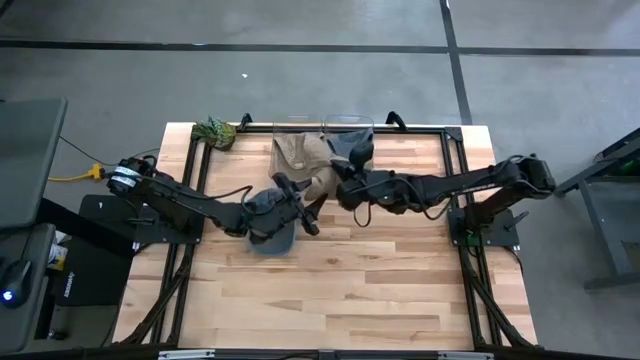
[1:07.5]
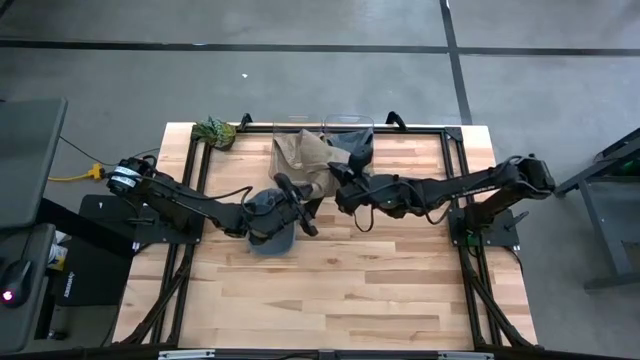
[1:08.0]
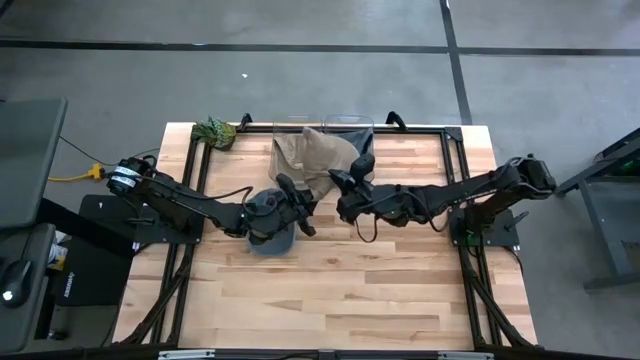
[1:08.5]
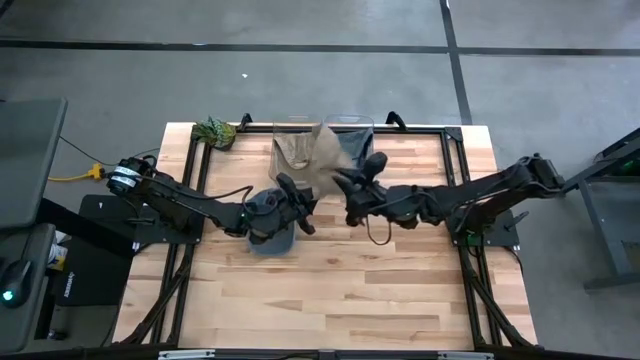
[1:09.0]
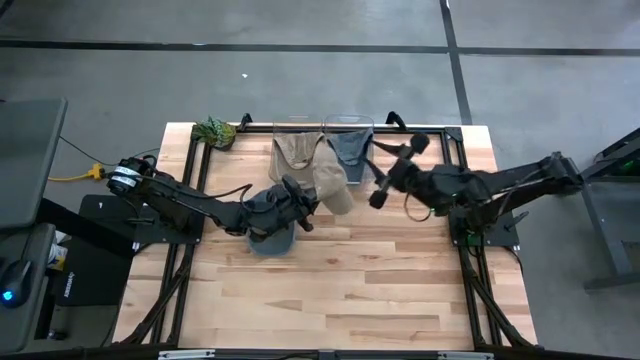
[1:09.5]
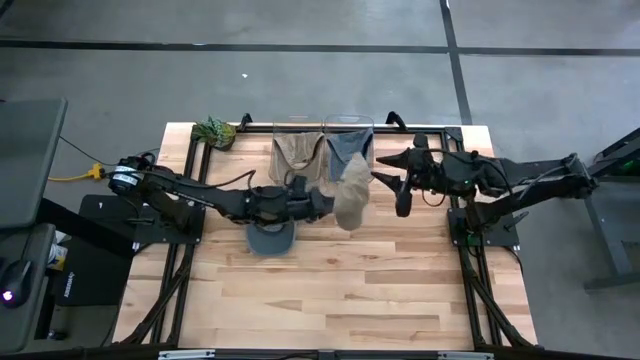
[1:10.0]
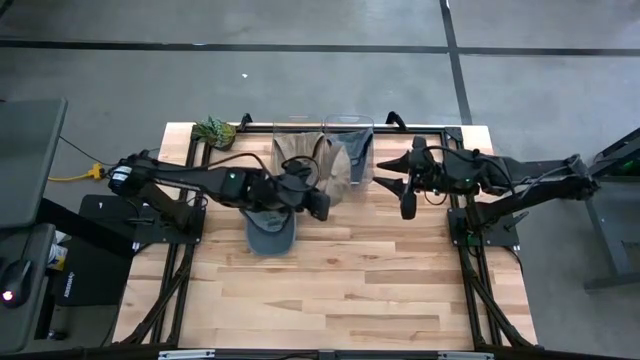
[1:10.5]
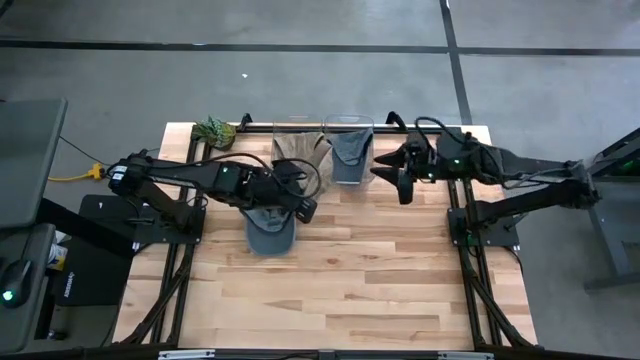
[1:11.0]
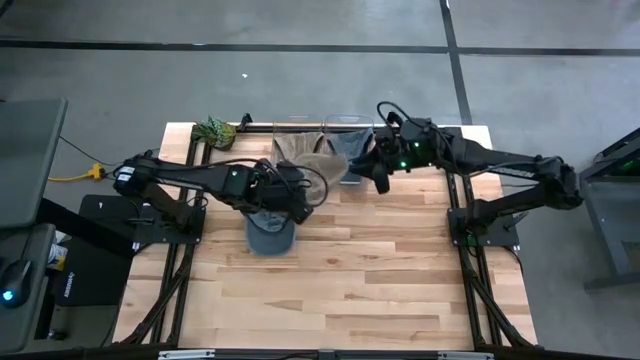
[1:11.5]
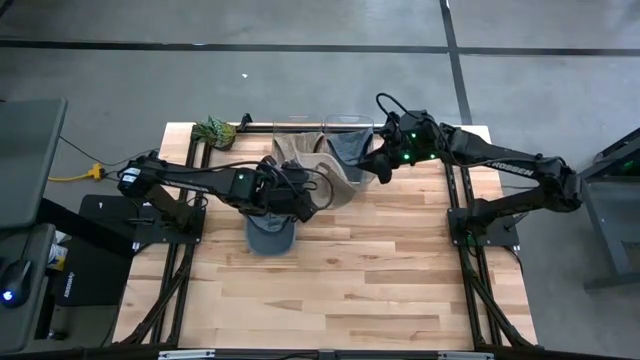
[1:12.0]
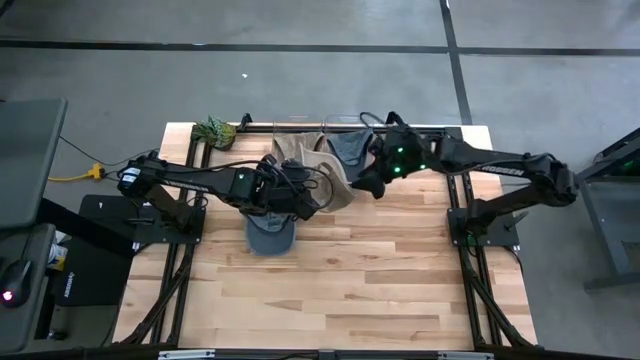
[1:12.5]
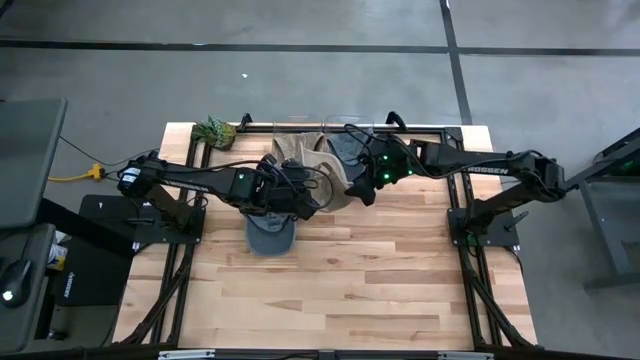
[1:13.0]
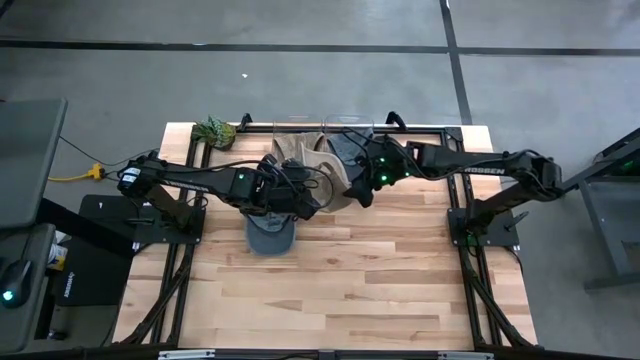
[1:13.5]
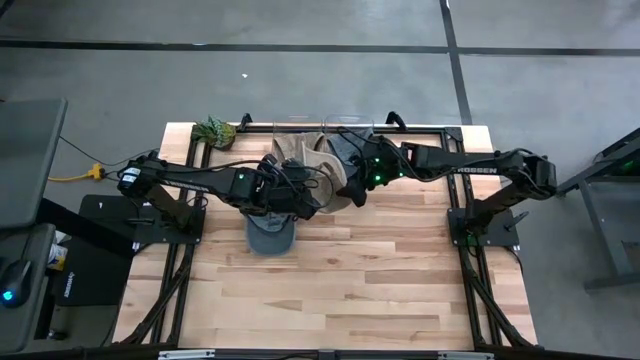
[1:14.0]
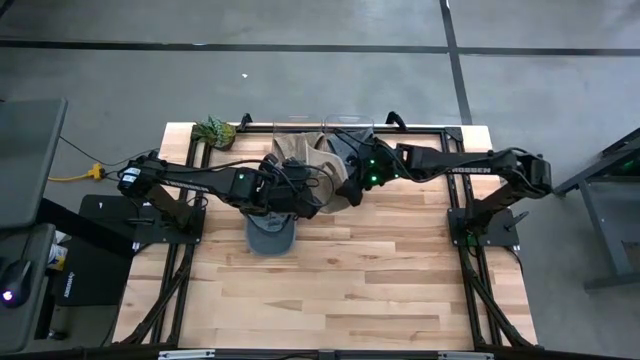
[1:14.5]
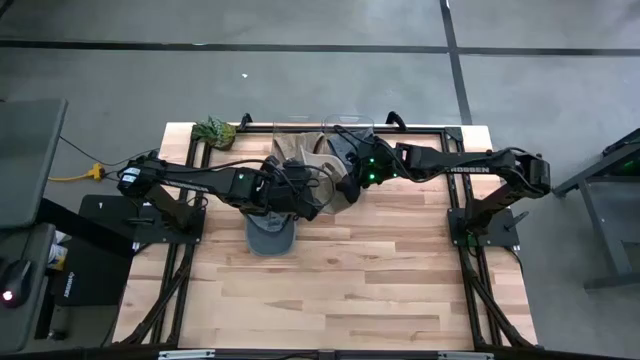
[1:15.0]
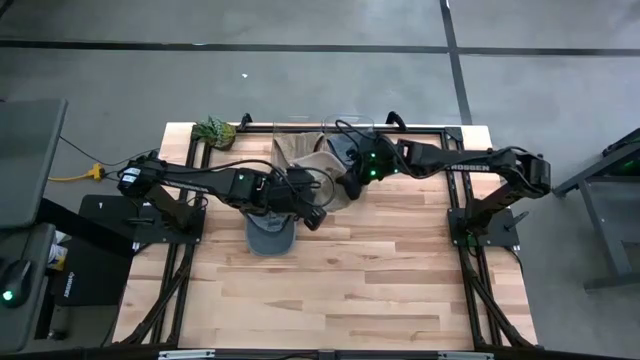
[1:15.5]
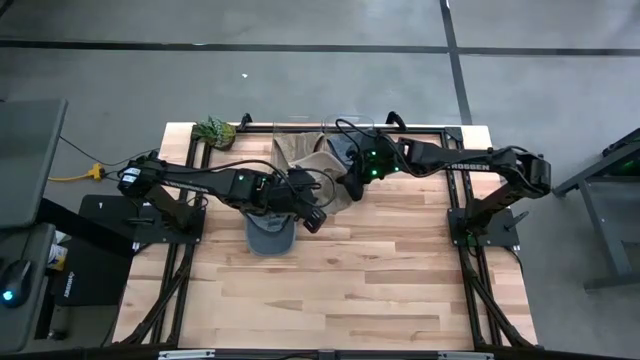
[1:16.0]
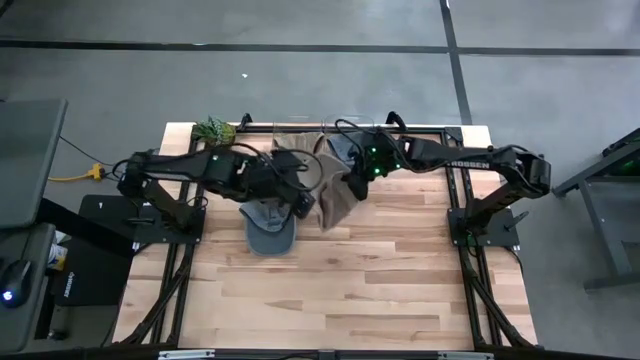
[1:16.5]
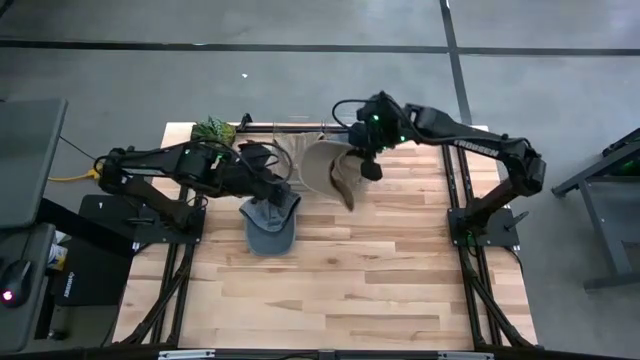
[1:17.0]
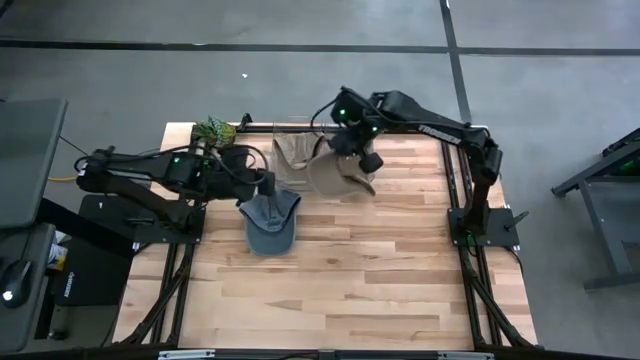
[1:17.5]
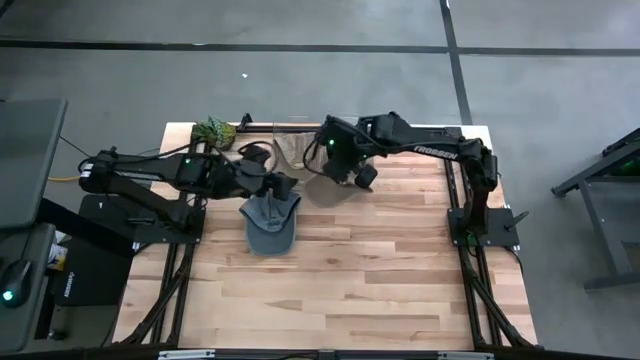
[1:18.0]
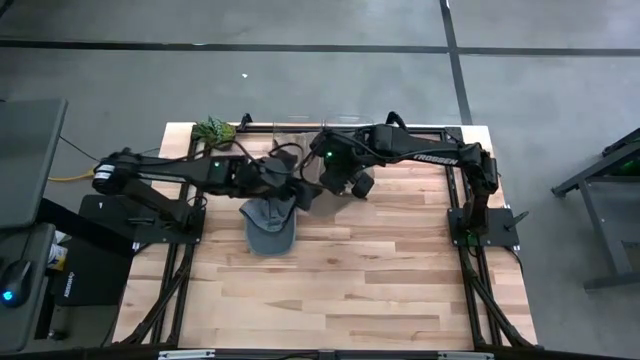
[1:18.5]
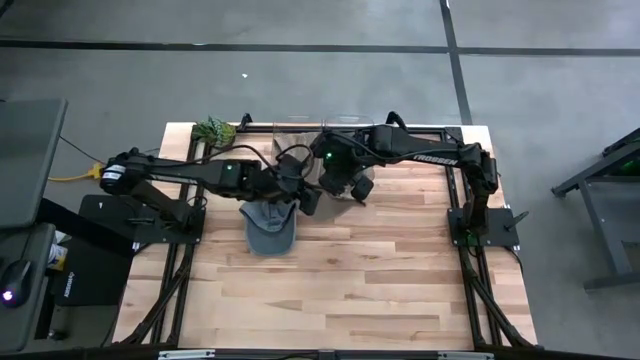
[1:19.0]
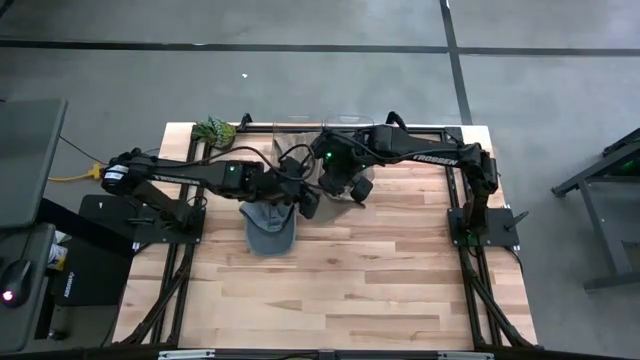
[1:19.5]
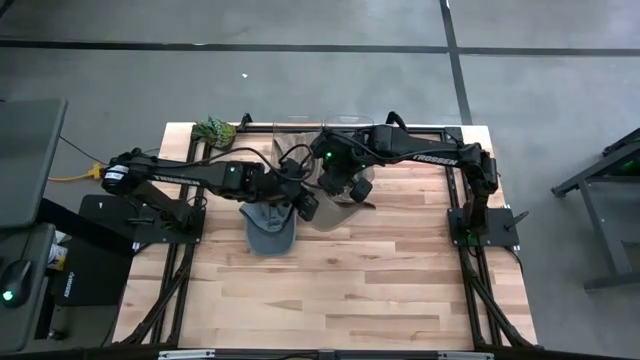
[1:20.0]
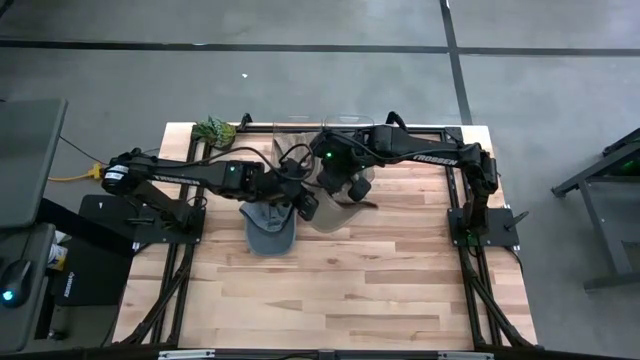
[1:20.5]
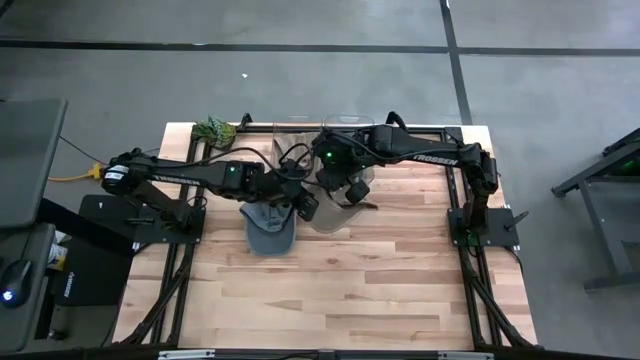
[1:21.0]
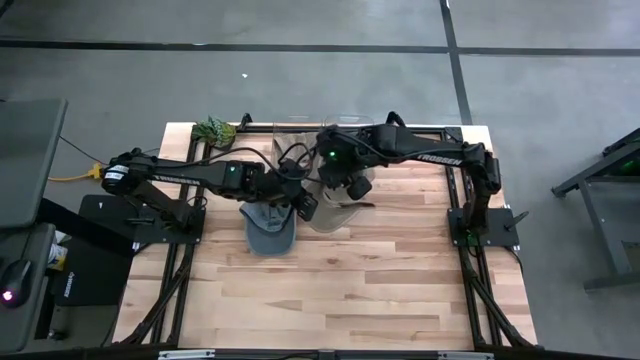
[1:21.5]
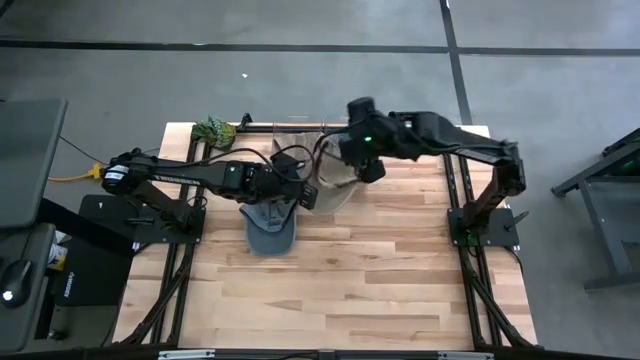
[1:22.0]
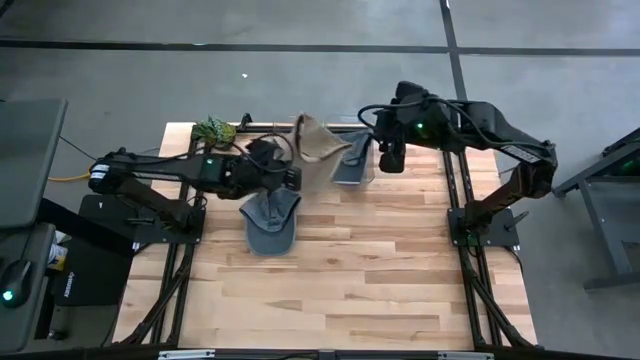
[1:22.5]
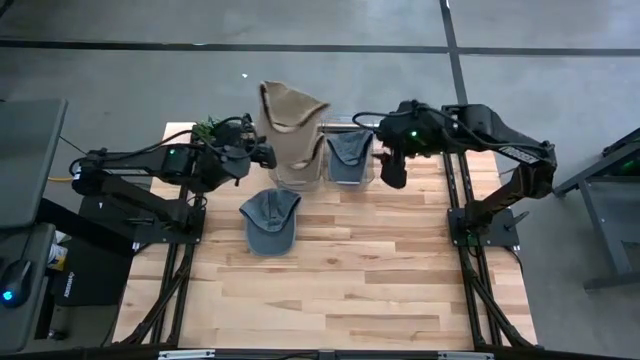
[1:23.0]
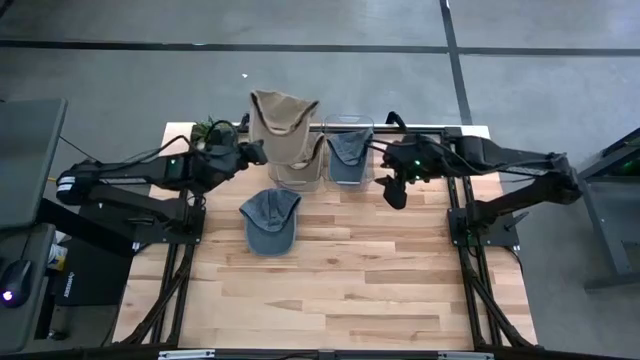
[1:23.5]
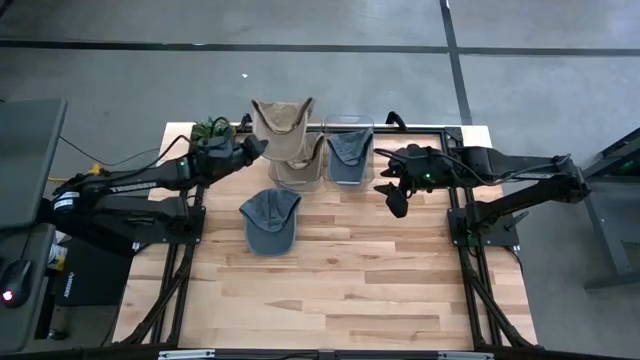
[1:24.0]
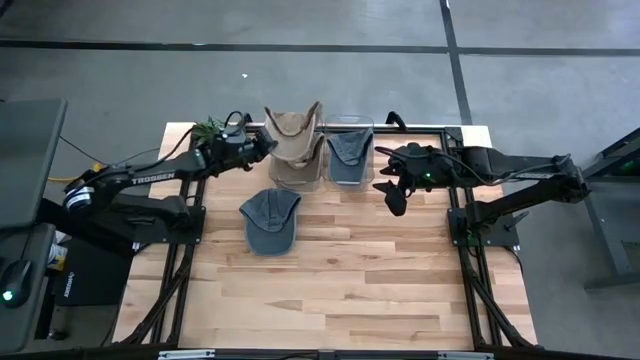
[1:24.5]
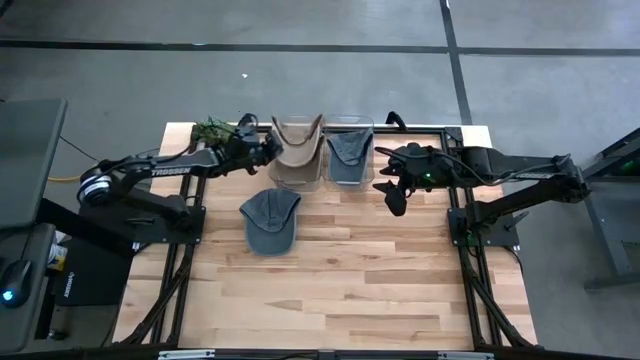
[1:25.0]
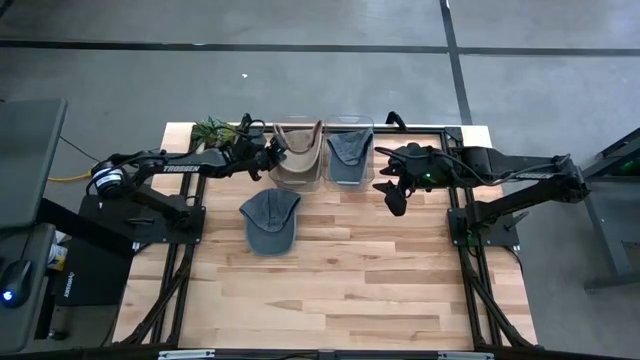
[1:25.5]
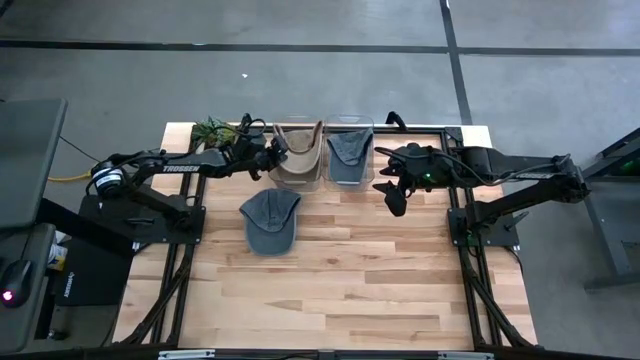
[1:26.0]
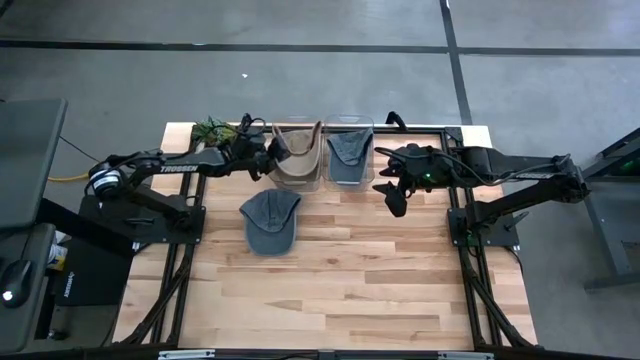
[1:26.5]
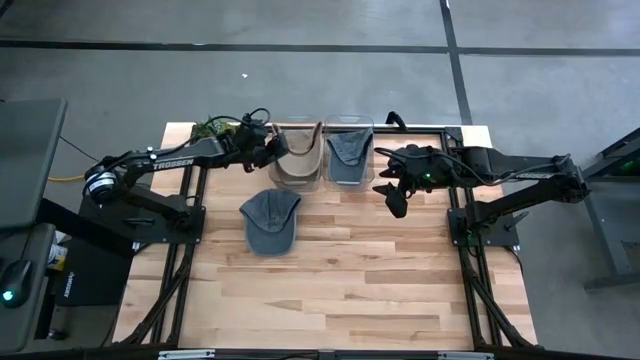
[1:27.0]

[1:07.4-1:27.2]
Task: Pick & Place hat
Put the brown cap into the left transparent bin

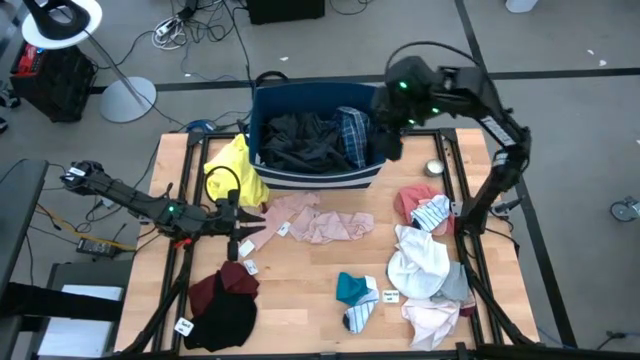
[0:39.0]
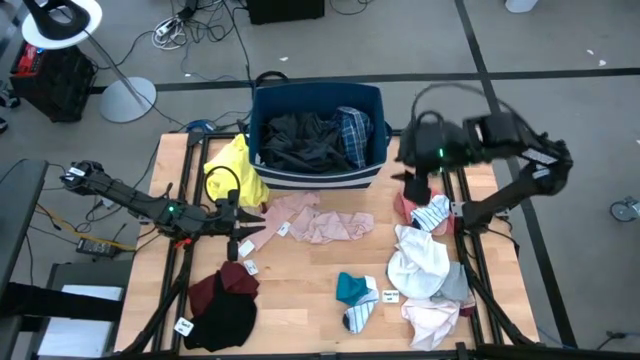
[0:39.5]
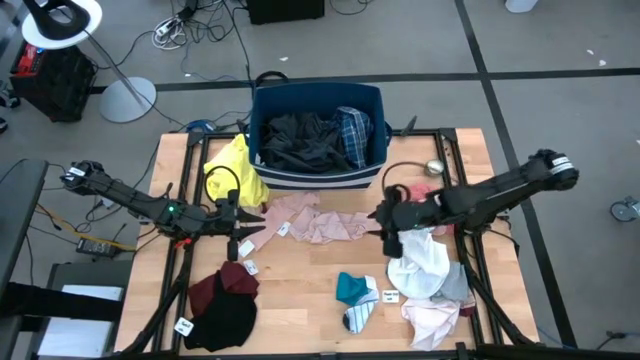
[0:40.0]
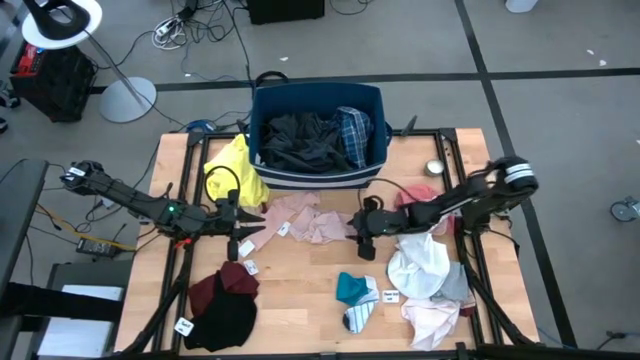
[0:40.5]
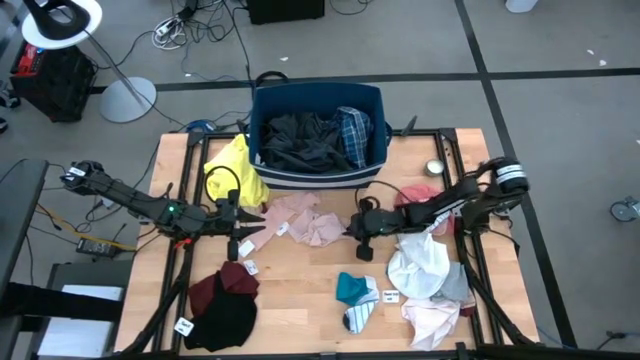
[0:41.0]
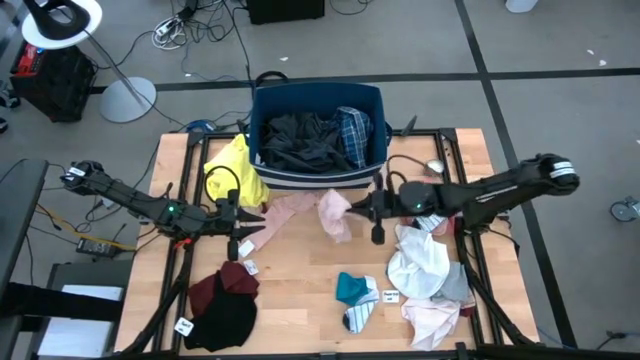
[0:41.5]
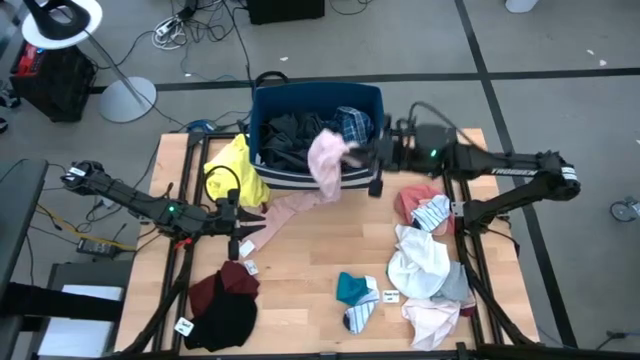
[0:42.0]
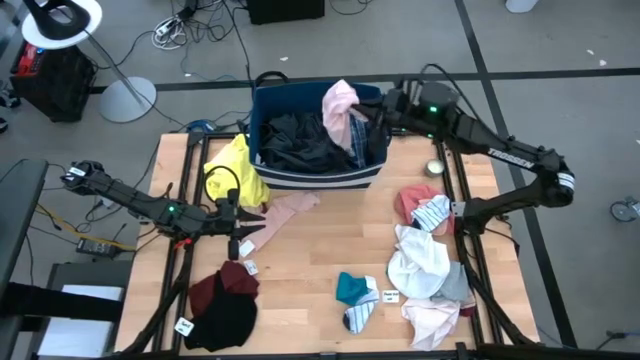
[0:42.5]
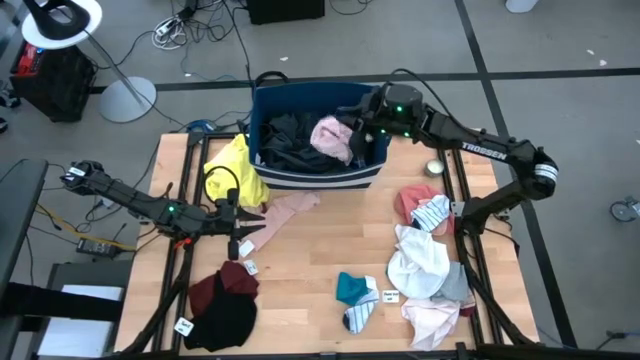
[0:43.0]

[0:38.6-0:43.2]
Task: Sort clothes
Put the light pink sock into the blue laundry bin
